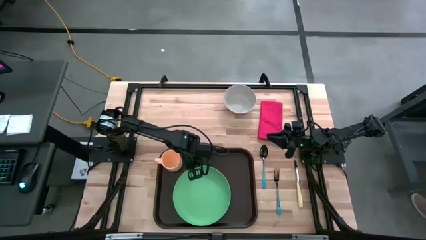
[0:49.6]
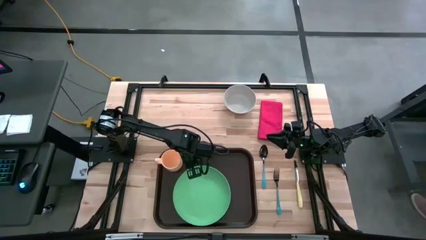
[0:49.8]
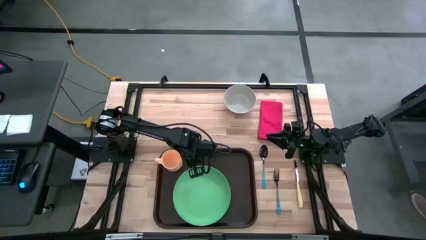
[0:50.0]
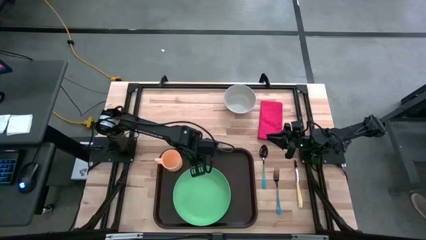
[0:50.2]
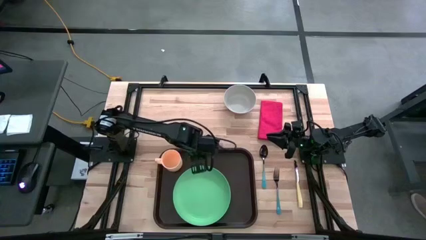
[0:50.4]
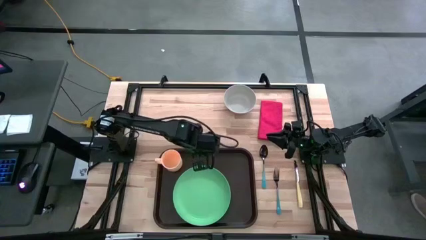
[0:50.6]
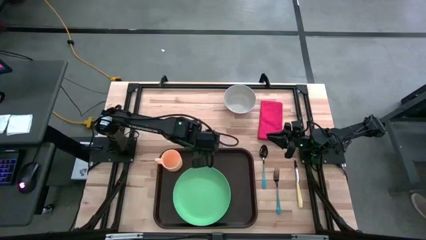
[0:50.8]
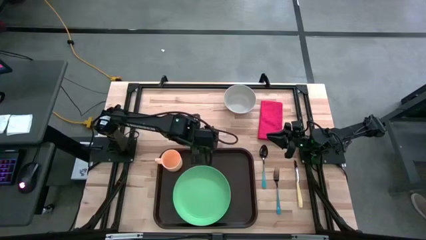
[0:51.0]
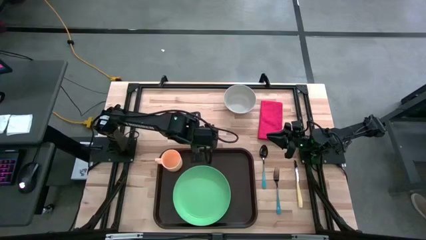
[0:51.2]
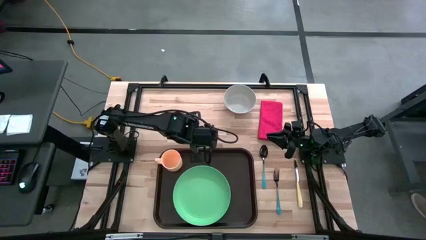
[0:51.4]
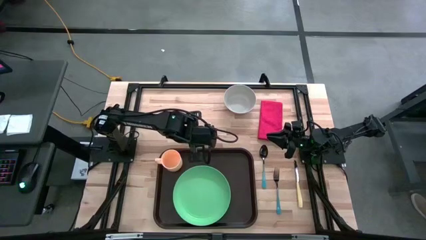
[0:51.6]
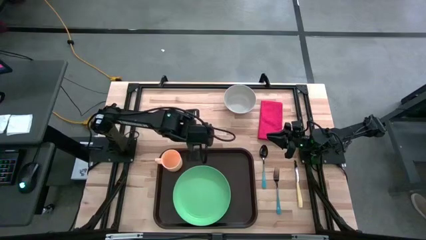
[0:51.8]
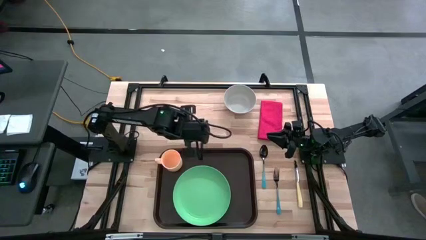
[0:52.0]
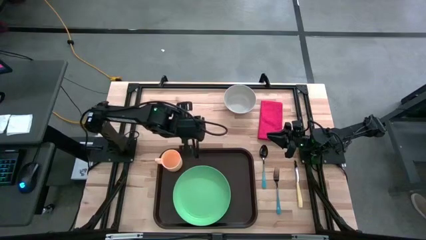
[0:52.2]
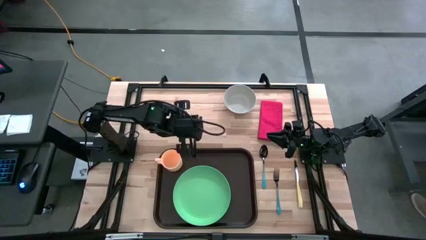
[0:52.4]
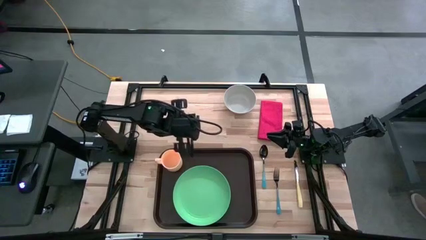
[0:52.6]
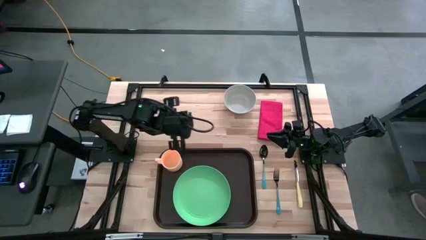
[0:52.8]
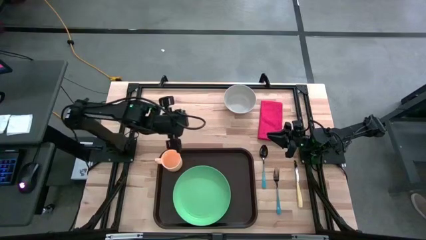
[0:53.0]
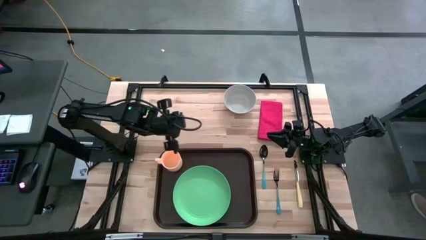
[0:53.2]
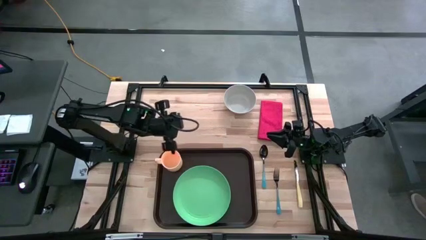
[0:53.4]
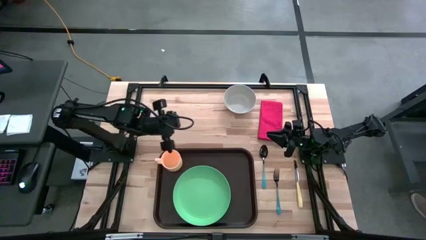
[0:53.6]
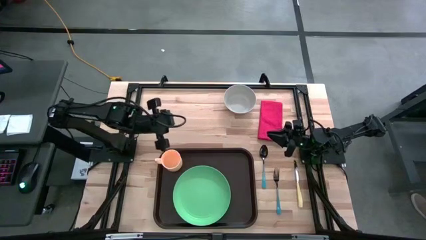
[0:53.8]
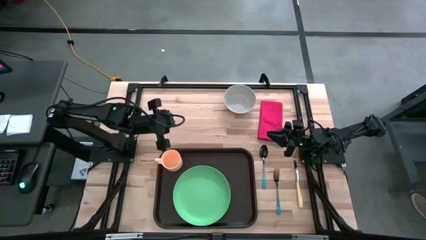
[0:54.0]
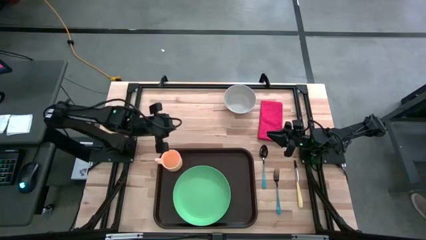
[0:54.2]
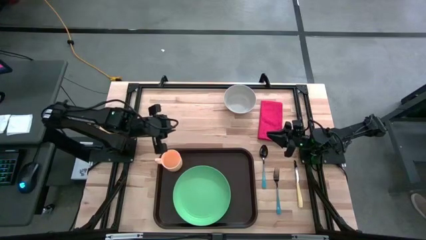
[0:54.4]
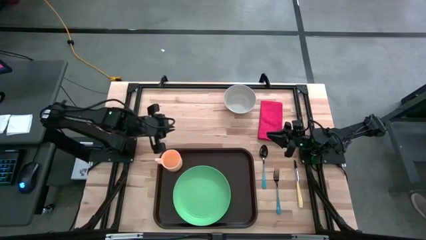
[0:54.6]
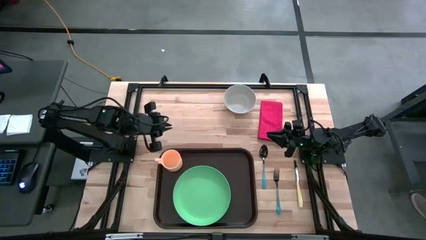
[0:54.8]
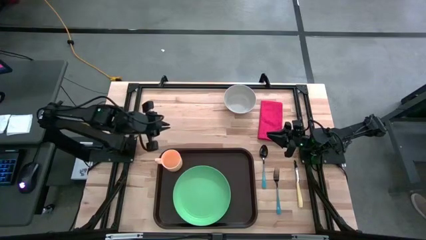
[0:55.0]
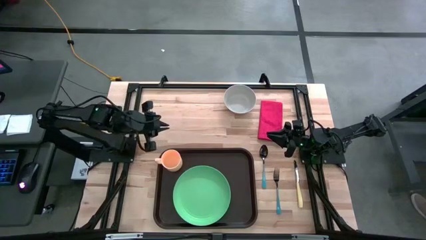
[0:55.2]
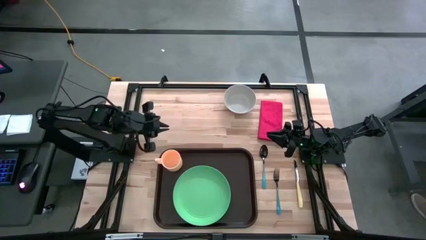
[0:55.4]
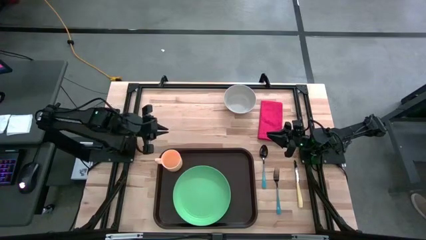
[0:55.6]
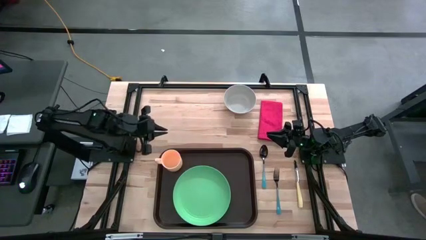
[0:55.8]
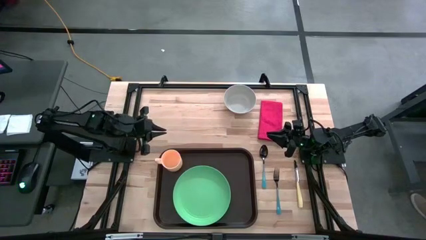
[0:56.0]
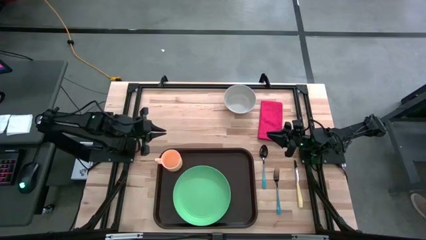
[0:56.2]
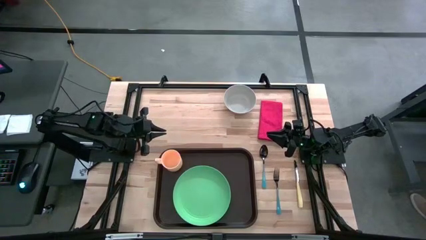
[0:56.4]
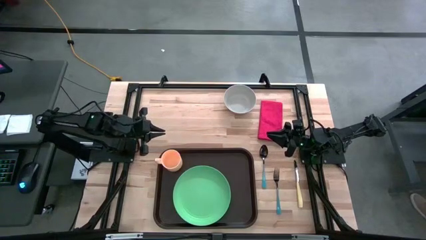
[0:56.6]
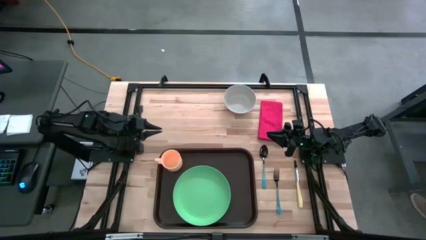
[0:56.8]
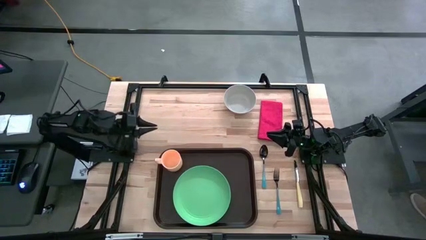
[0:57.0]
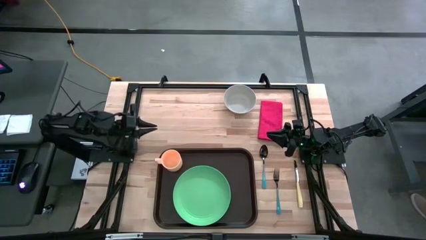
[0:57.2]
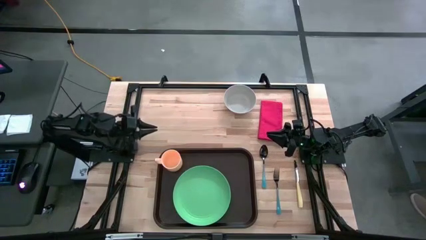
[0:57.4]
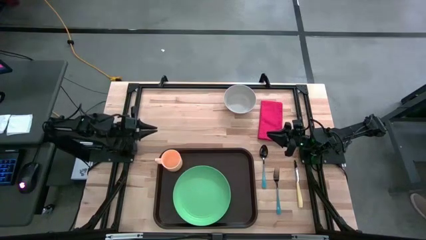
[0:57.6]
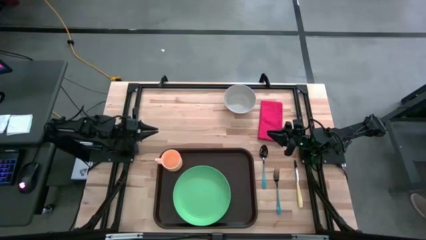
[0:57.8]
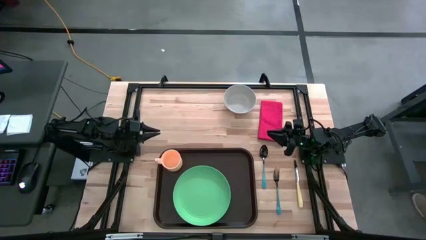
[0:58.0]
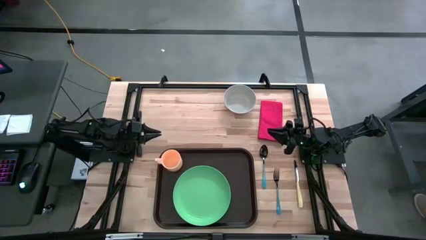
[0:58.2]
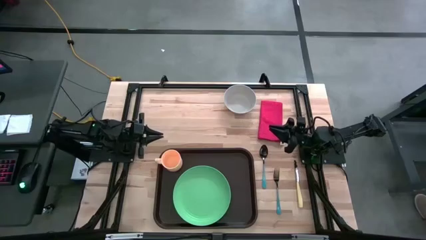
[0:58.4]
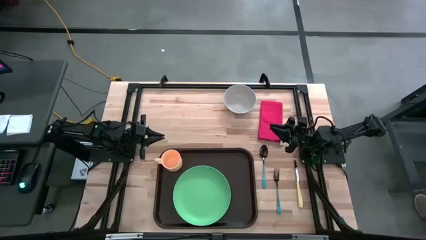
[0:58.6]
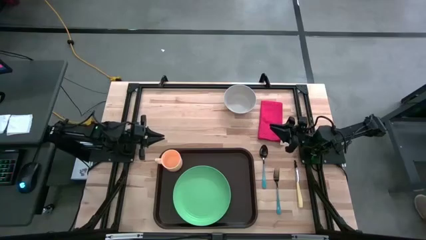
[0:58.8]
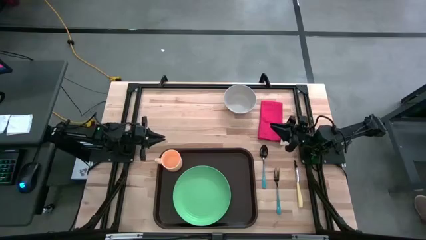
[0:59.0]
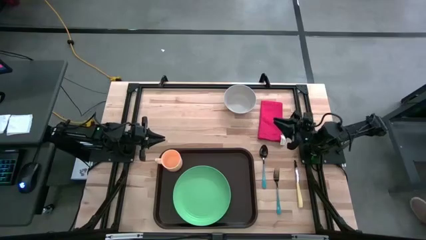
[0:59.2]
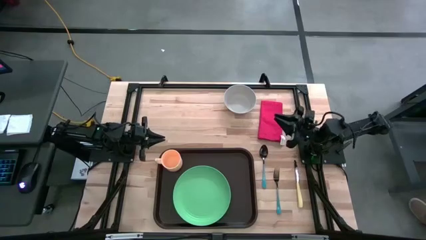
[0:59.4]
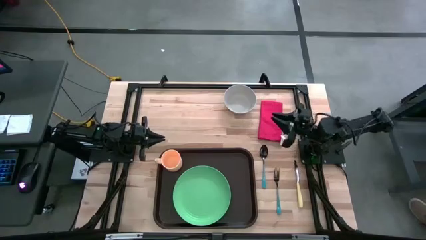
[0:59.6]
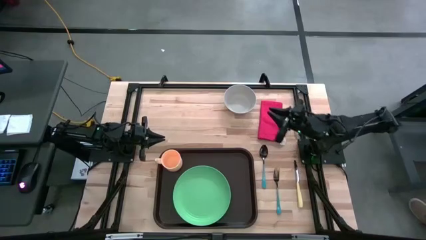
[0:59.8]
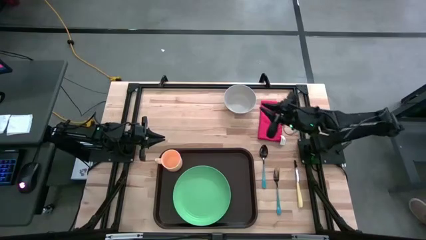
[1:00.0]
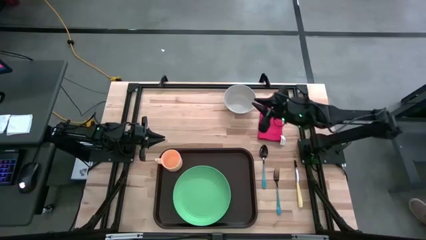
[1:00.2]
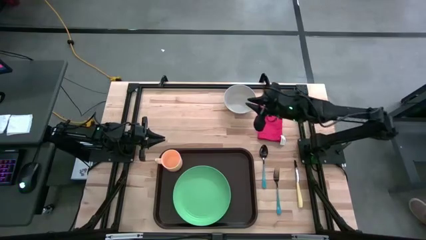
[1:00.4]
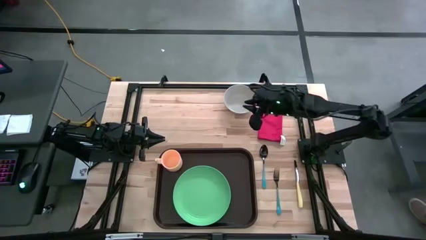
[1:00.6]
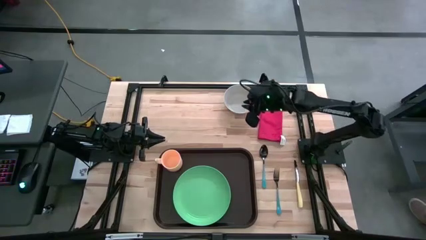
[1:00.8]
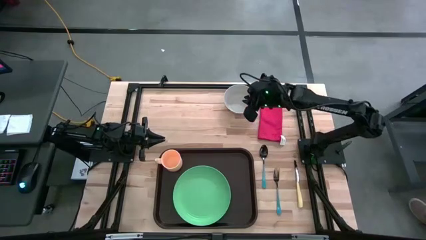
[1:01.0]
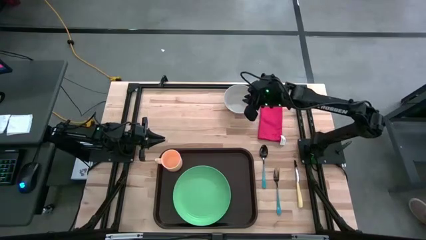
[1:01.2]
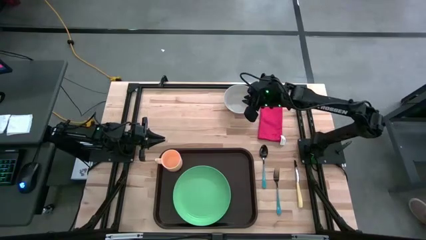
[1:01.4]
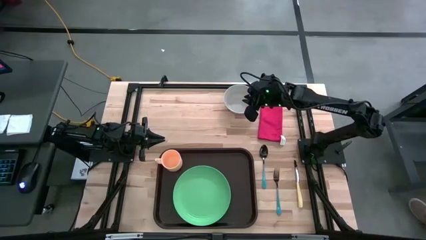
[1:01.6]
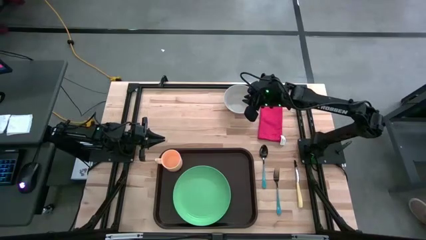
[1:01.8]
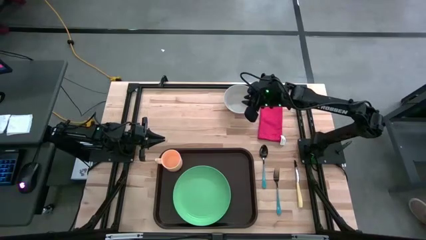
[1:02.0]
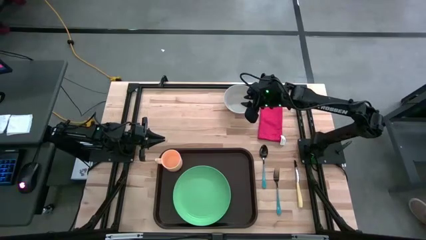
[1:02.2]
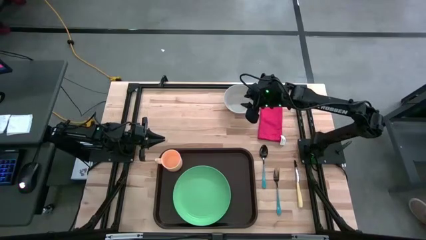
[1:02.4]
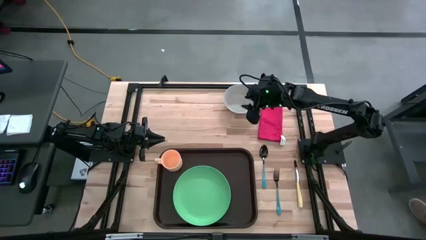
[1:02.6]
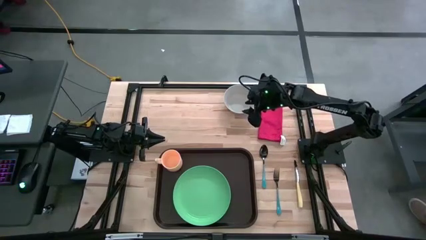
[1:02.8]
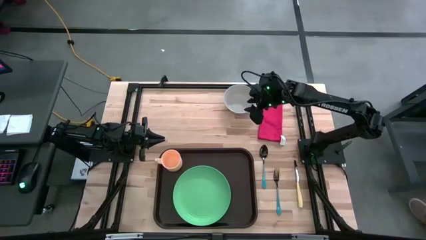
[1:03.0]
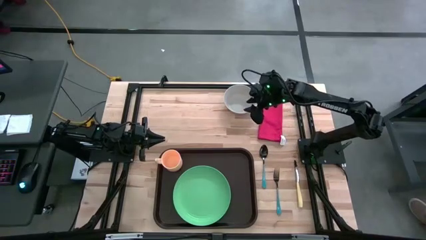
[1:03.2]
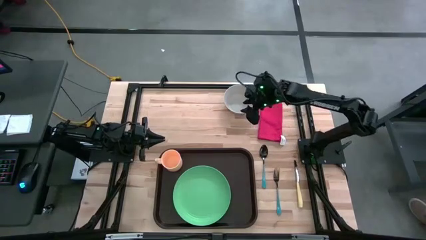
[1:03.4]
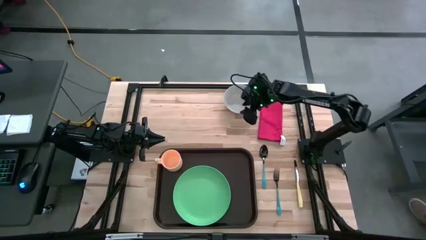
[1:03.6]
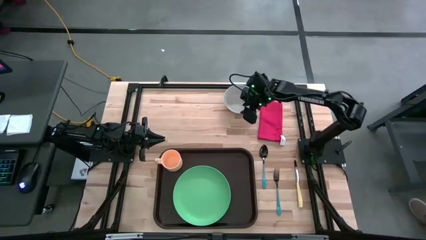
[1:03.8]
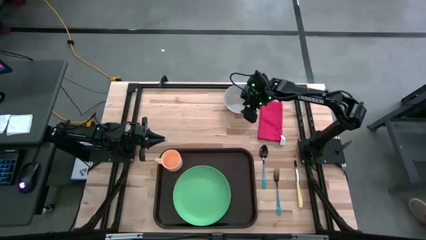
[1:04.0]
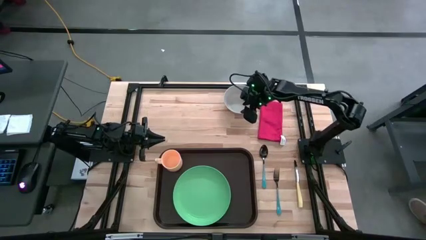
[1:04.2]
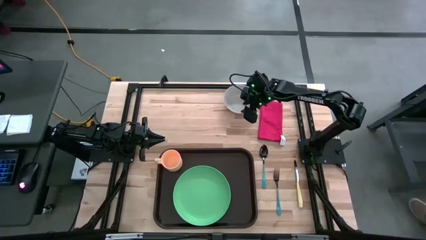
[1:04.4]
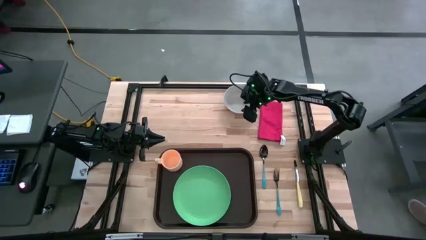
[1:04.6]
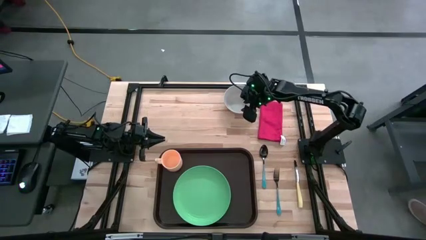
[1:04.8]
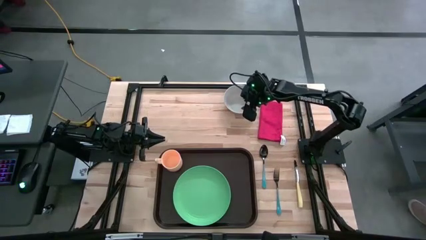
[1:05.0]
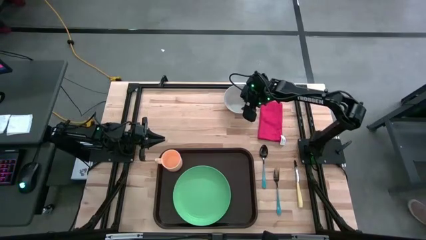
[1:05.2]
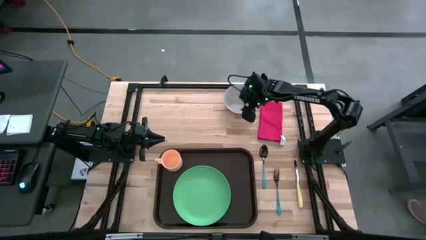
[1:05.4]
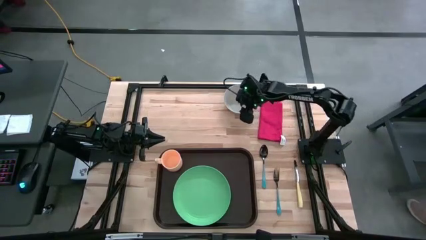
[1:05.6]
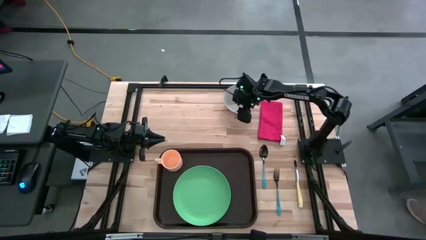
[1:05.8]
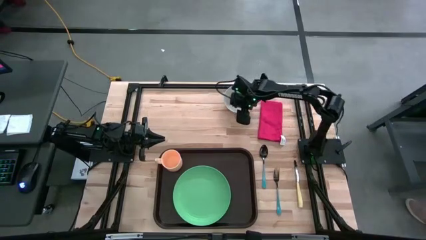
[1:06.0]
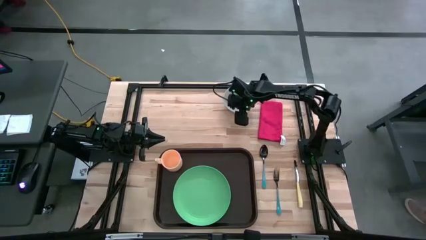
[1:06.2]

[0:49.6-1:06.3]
Task: Set up tray
Put the gray bowl on the green plate

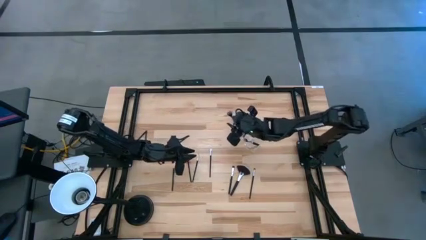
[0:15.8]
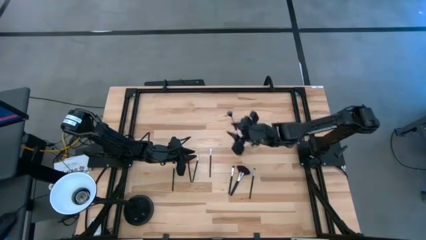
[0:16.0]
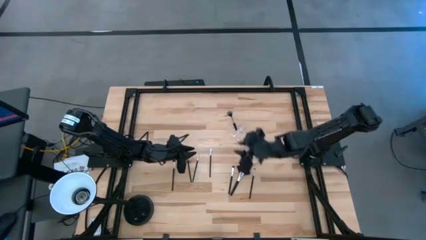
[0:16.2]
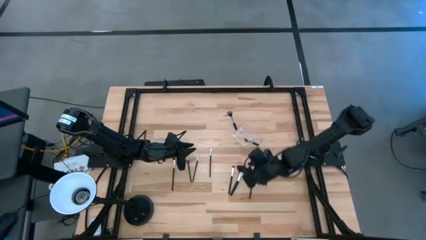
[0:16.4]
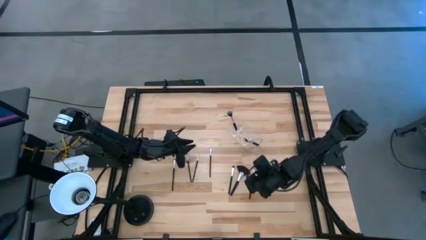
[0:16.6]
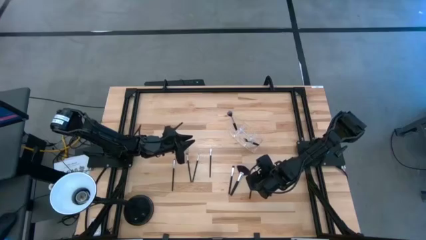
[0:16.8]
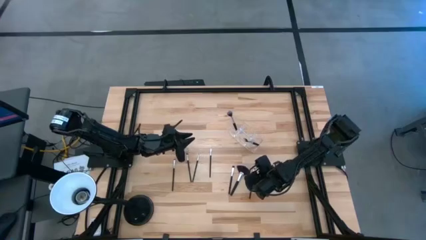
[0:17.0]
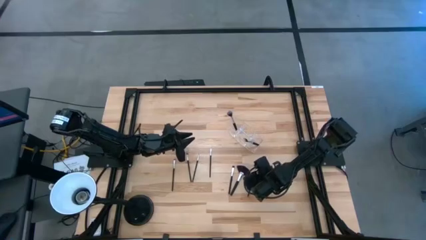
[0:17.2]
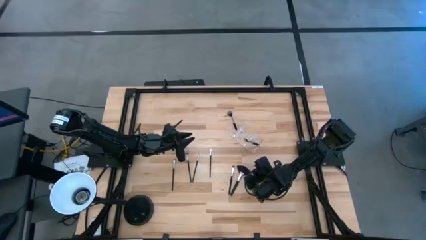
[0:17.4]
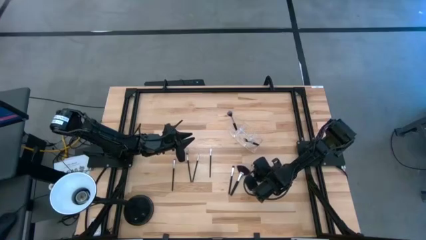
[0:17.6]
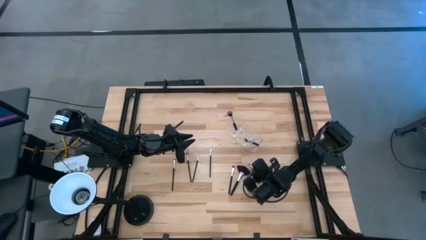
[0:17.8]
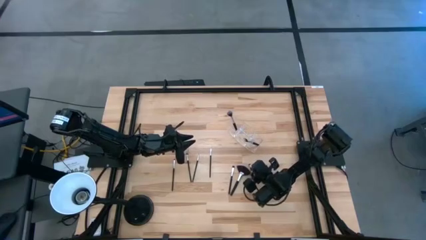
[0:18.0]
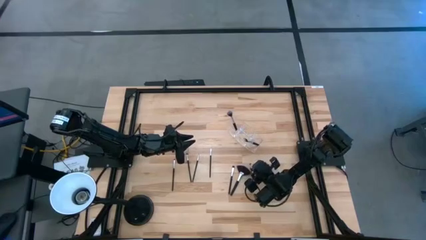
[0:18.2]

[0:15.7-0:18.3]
Task: Put items in baskets/containers
Put the eyeshadow brush into the transparent organizer
